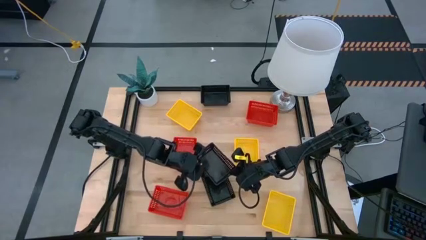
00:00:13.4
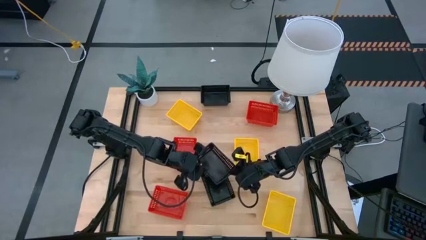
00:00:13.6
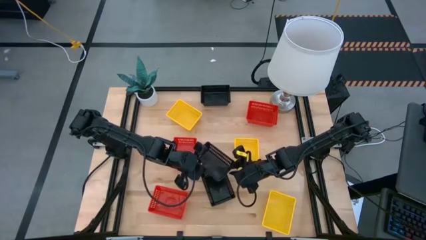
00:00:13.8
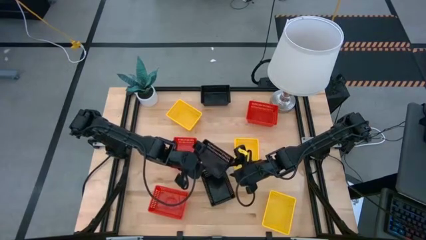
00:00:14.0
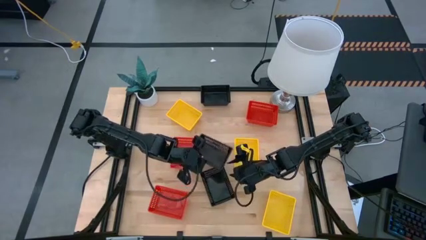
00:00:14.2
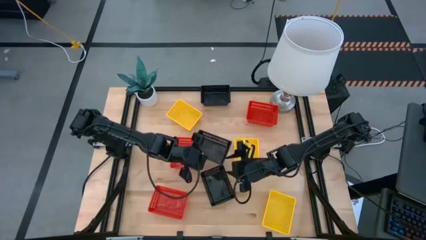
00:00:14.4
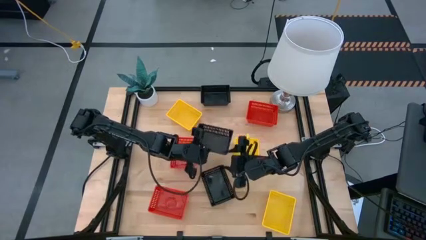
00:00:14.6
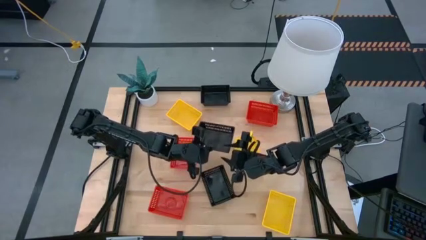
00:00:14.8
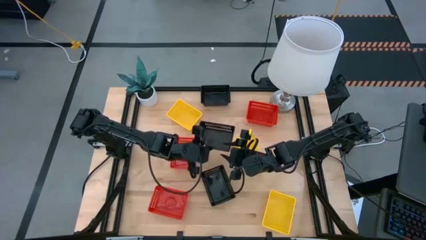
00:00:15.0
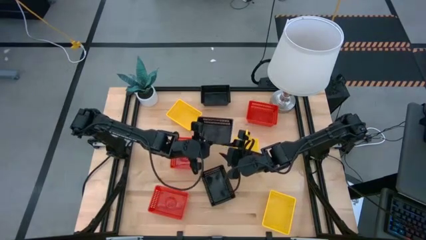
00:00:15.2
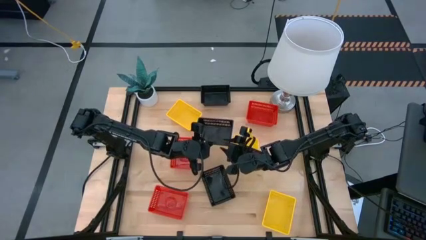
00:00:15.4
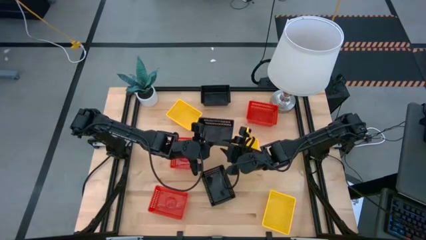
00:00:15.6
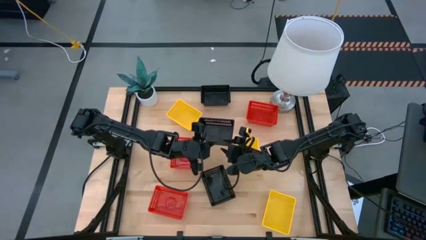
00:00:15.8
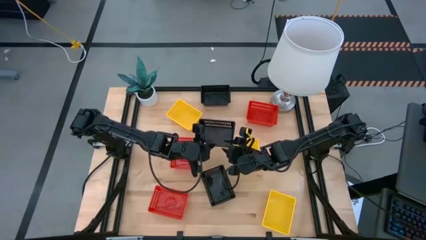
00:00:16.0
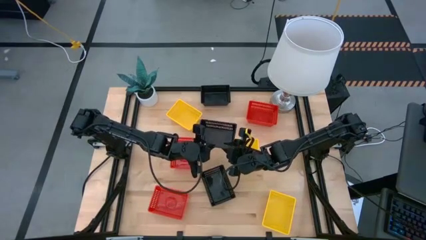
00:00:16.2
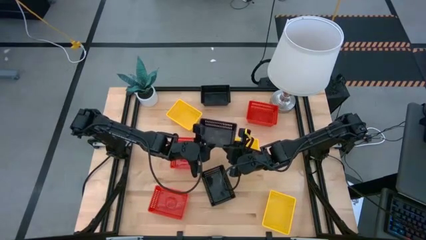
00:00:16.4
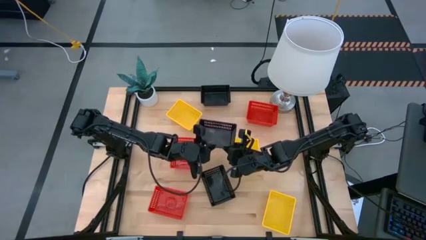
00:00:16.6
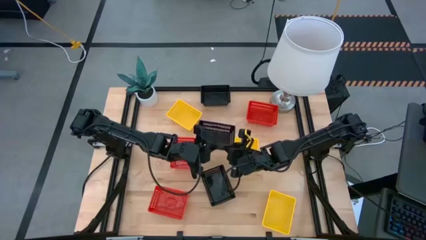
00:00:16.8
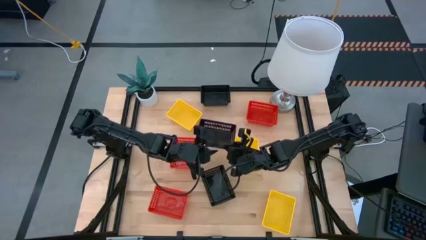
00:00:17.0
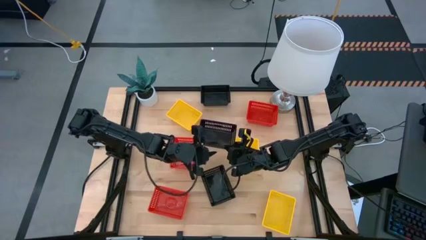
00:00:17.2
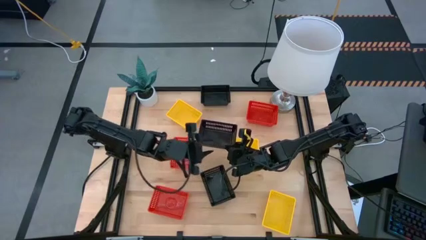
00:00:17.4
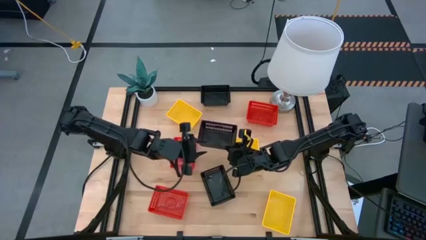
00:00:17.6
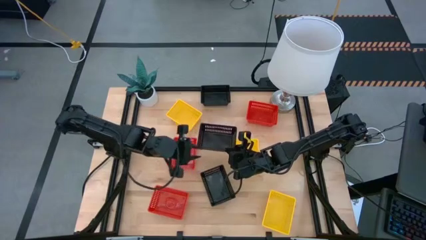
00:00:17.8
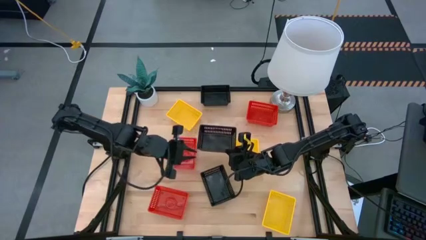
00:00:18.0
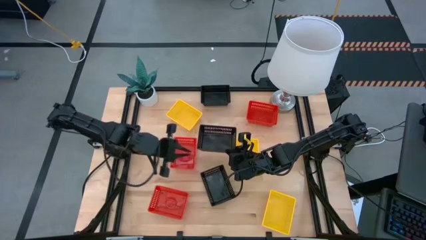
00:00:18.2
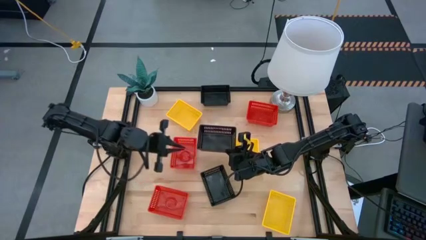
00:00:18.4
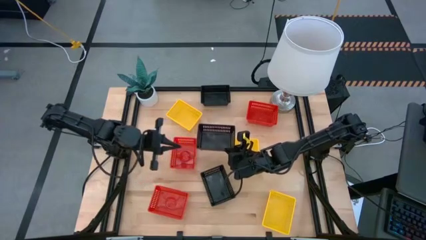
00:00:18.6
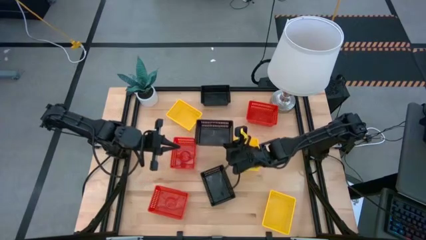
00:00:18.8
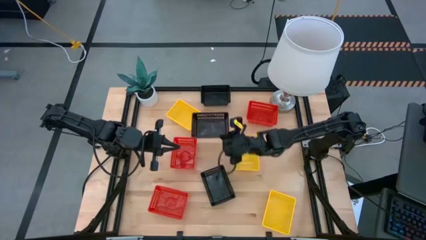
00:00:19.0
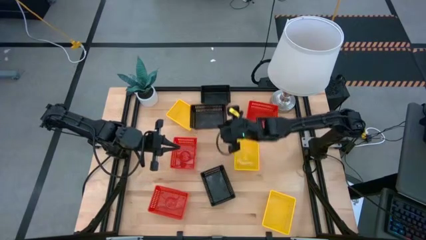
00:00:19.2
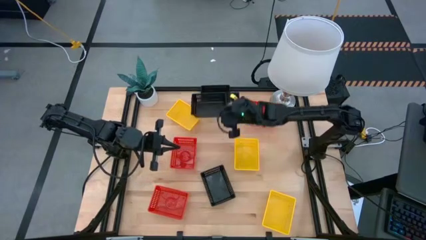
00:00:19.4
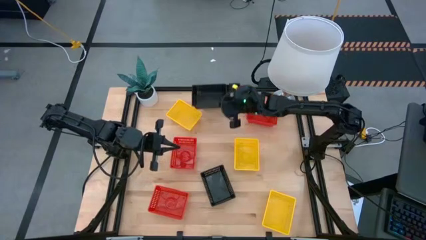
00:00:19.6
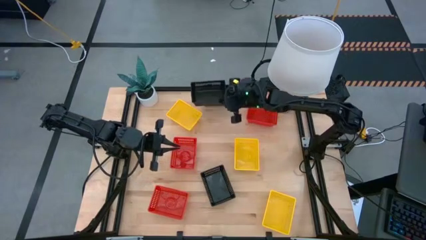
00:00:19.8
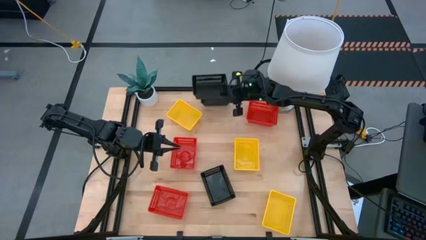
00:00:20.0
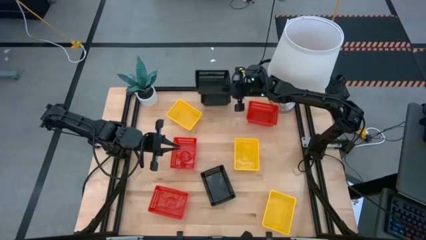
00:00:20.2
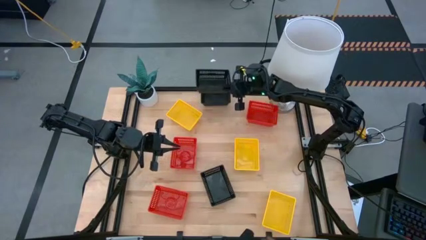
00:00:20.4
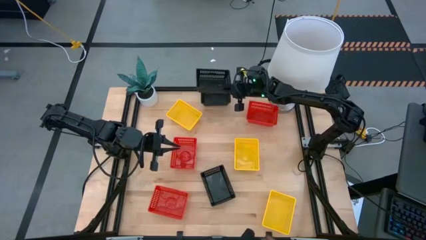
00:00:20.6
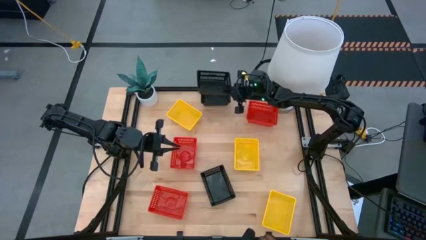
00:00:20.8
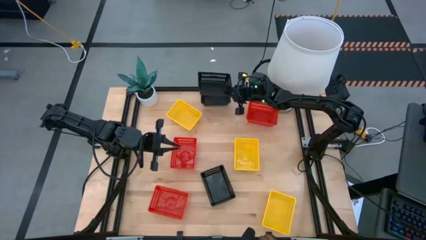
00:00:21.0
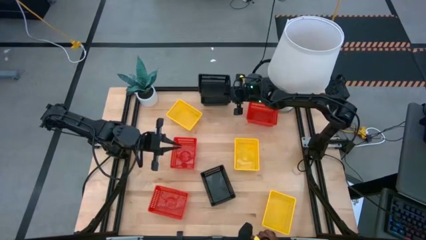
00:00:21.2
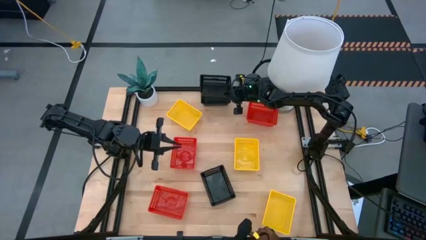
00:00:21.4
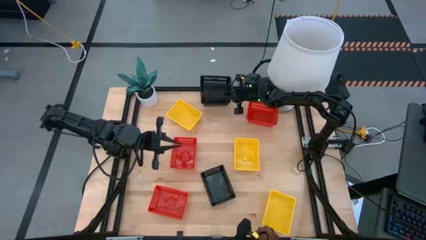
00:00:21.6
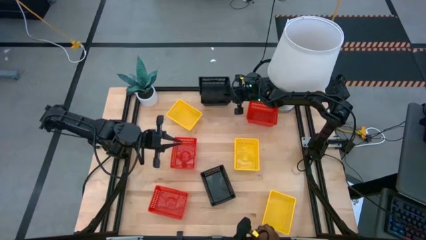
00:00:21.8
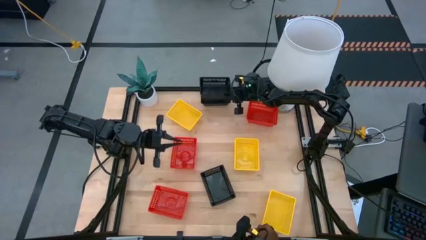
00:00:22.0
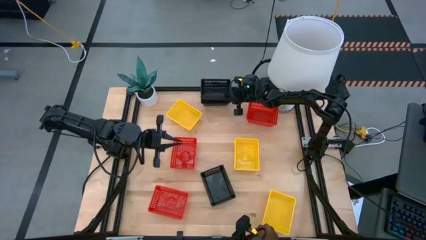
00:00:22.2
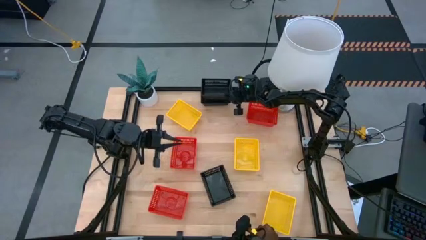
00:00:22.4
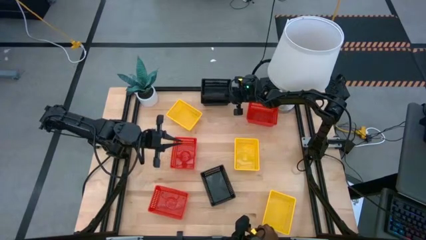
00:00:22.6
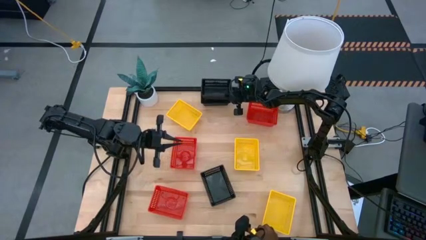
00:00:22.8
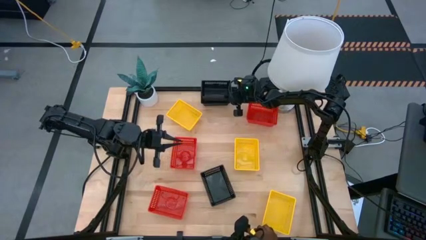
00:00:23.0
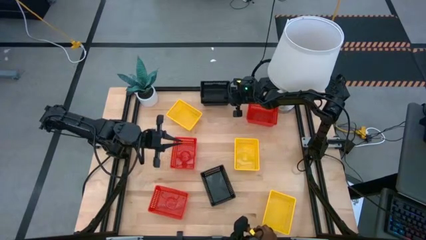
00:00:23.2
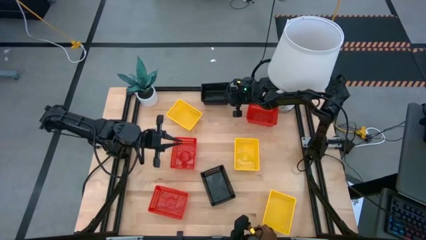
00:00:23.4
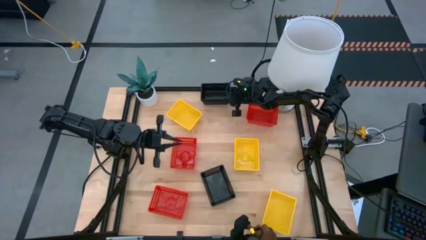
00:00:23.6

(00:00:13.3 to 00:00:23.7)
Stack the center black basket on the top black basket

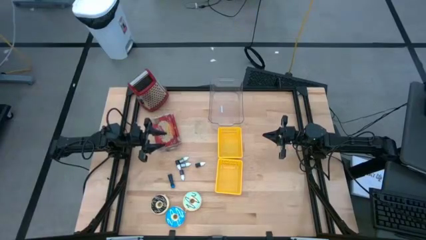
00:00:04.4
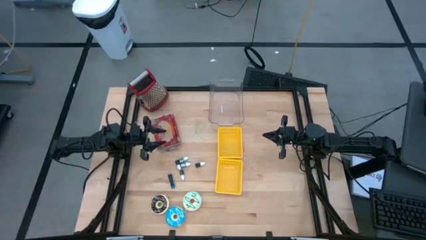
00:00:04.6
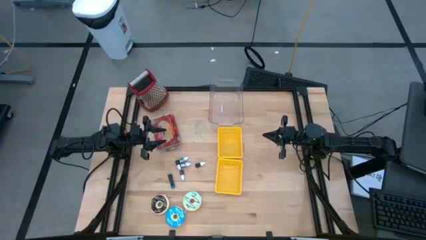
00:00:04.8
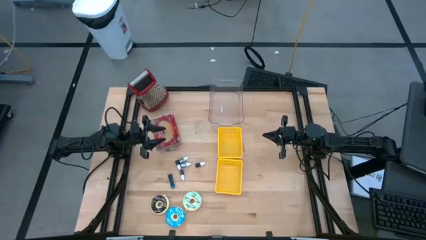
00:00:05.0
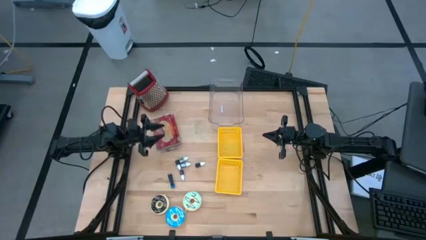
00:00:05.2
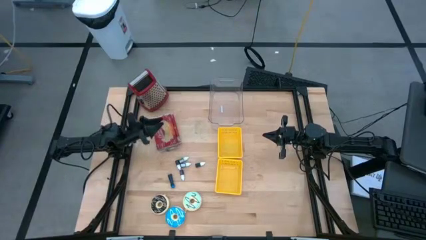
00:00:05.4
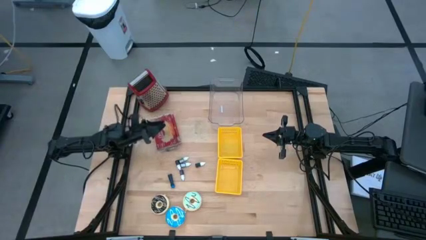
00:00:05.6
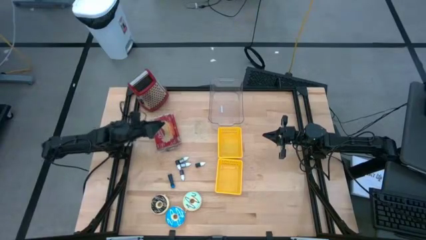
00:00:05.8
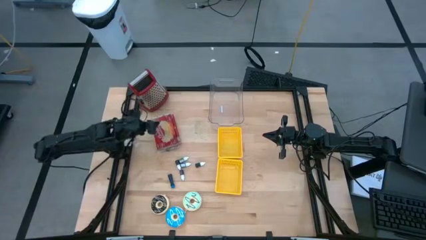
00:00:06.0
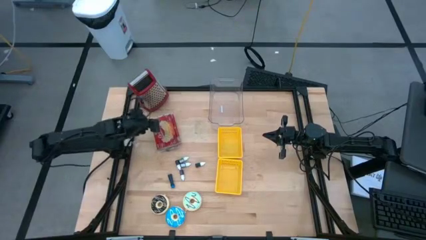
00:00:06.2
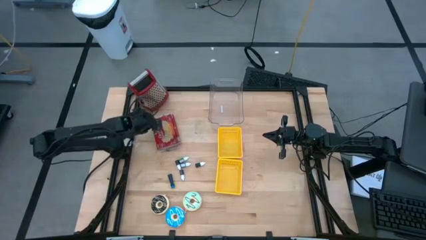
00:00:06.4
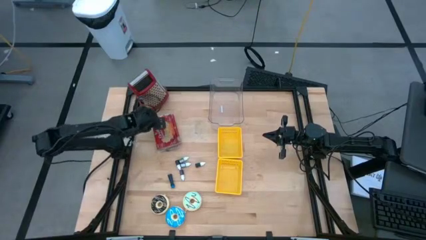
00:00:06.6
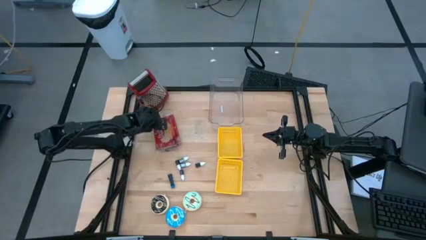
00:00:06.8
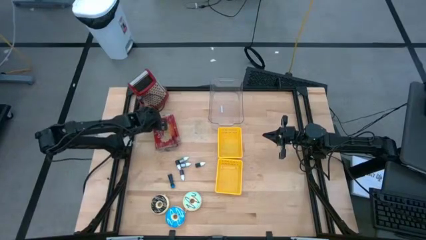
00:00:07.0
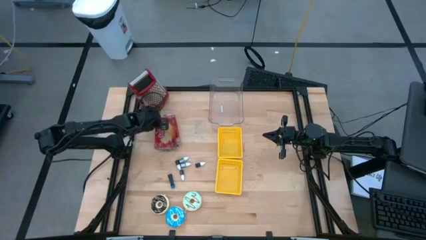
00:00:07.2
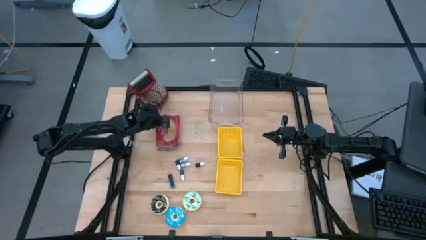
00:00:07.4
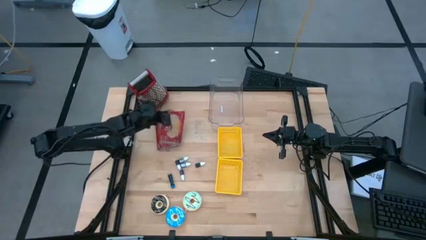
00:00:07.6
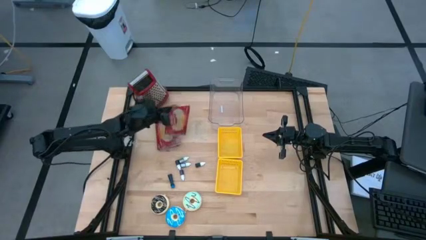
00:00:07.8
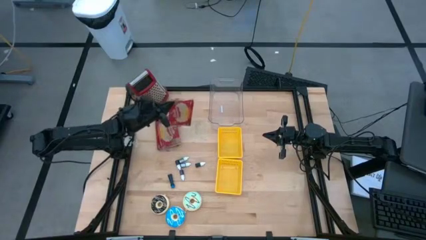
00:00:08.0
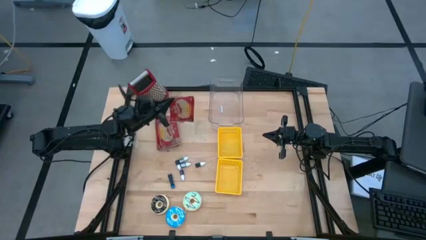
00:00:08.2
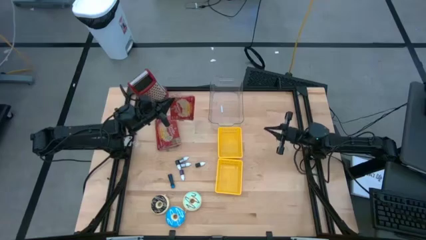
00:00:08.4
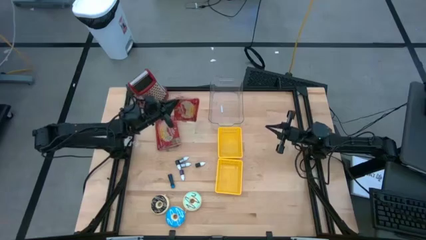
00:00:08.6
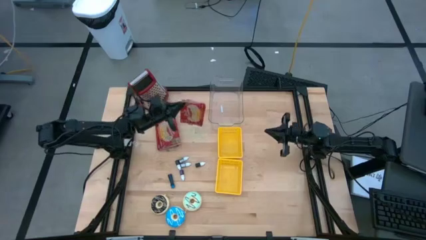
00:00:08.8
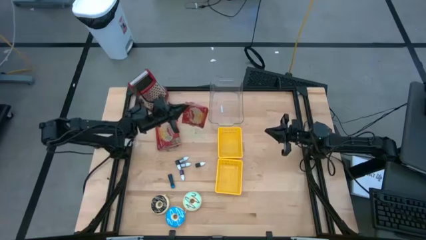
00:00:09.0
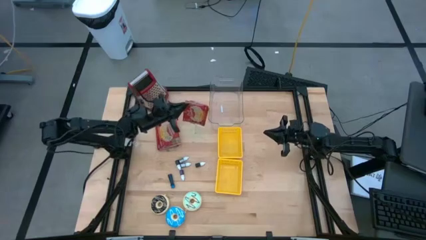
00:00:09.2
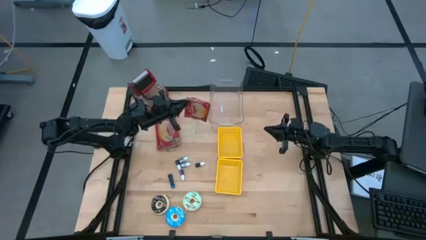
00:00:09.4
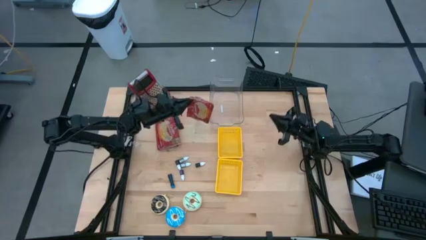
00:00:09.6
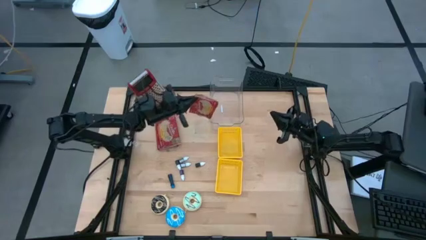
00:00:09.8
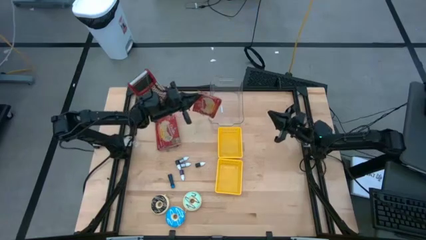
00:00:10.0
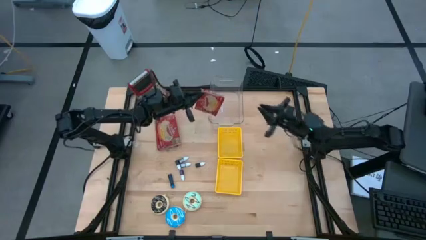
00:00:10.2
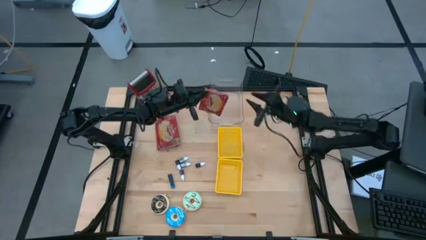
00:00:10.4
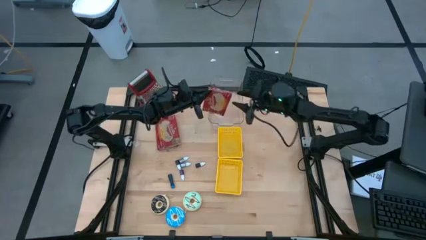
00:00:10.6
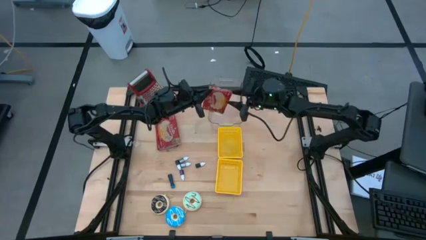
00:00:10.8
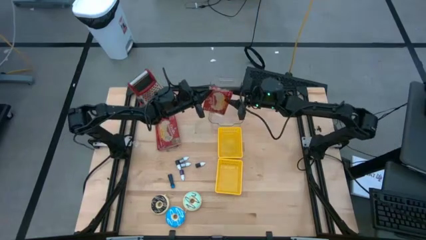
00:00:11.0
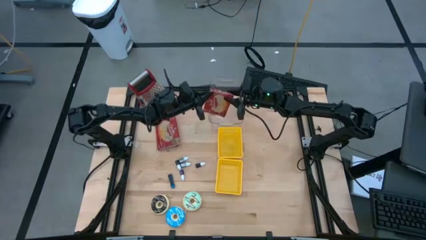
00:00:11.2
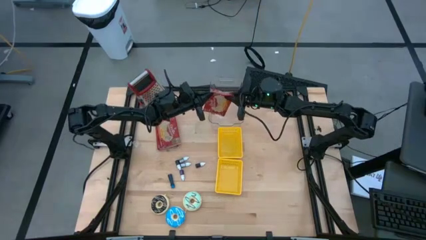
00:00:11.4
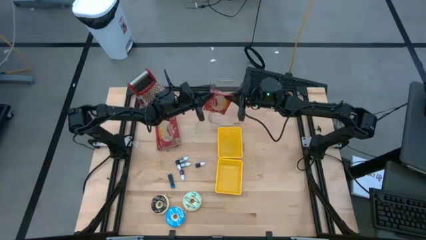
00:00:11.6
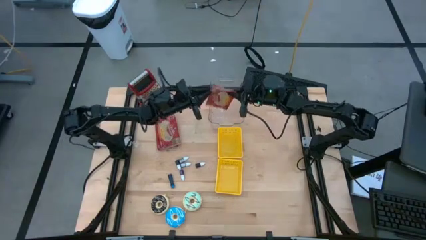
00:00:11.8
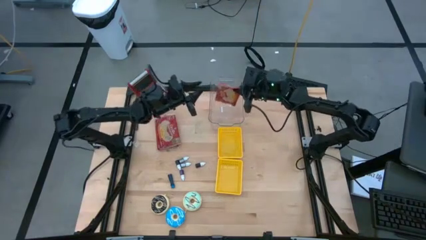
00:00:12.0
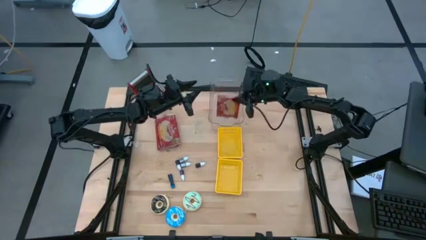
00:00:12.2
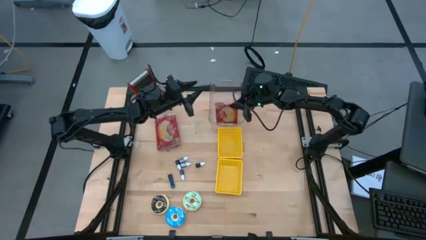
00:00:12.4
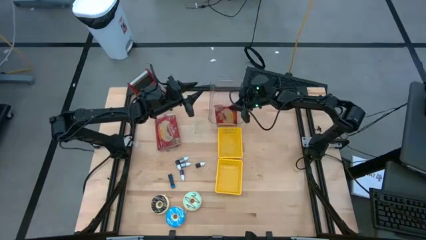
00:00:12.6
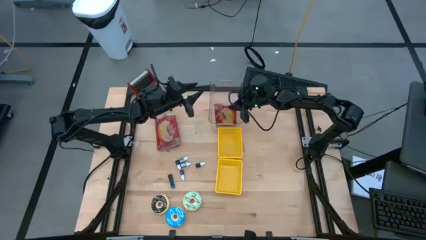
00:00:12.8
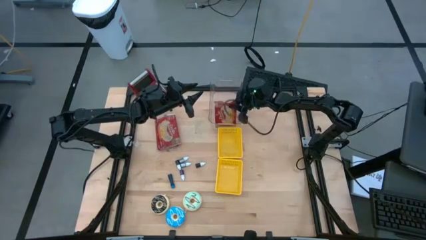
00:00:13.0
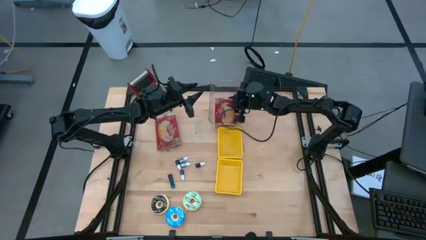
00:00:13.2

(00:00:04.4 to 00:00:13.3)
Put the red popcorn bag into the transparent bin
